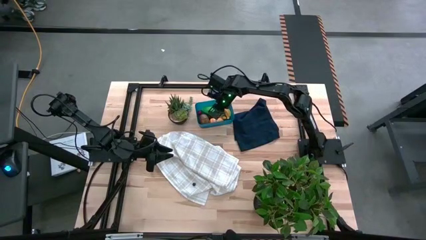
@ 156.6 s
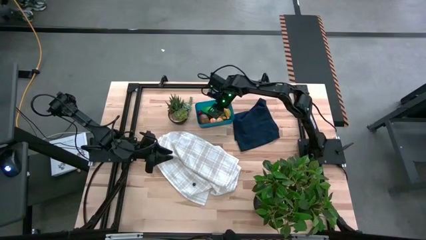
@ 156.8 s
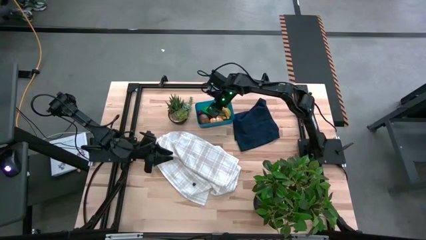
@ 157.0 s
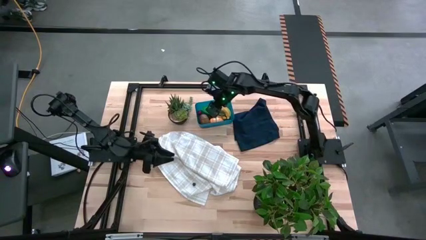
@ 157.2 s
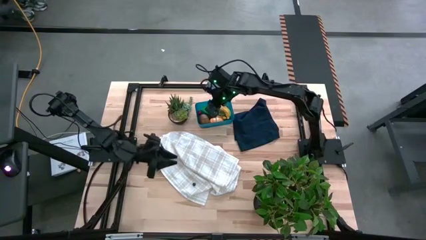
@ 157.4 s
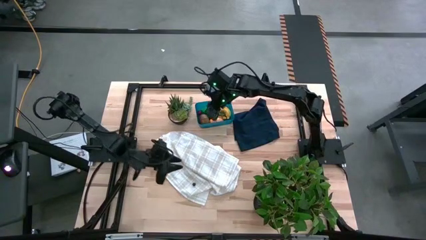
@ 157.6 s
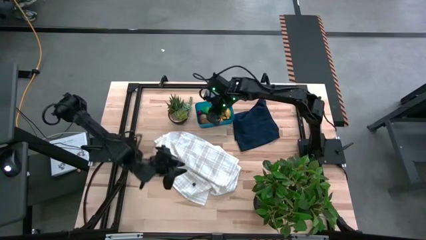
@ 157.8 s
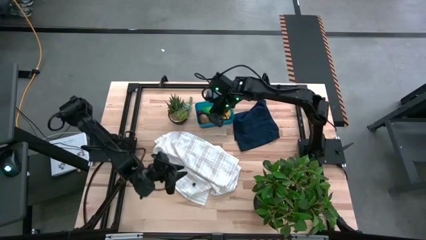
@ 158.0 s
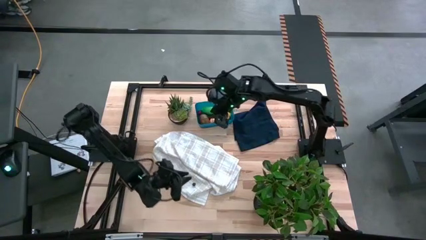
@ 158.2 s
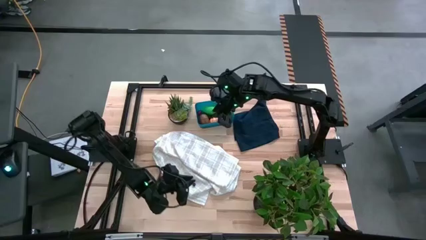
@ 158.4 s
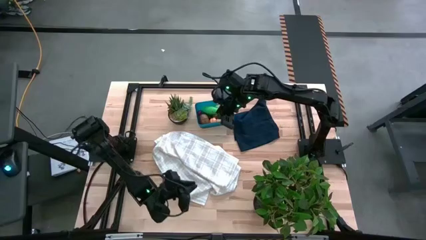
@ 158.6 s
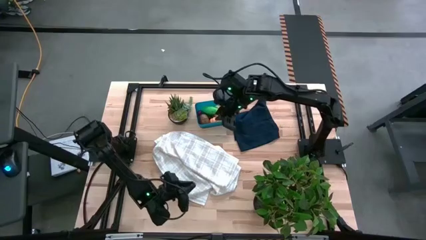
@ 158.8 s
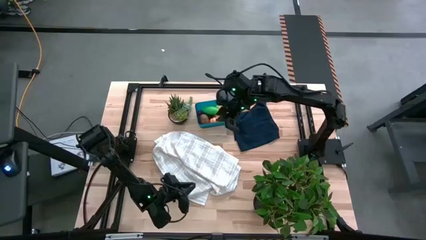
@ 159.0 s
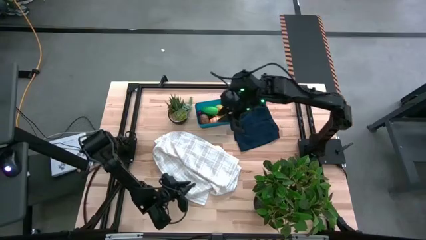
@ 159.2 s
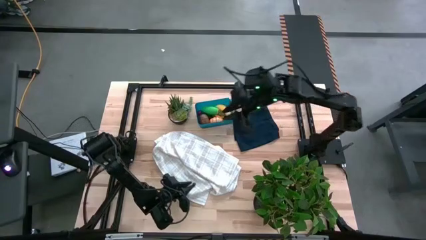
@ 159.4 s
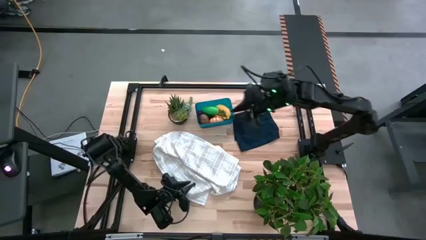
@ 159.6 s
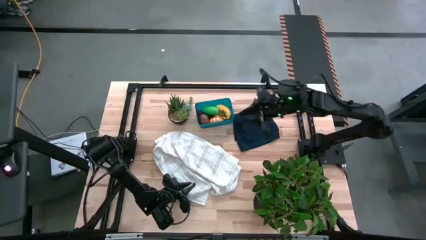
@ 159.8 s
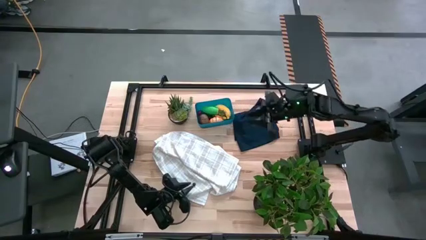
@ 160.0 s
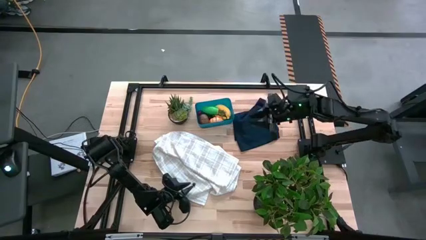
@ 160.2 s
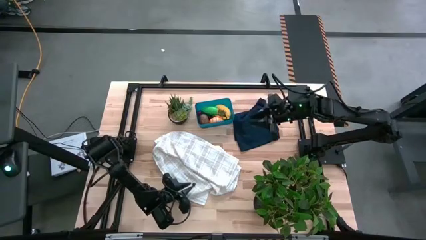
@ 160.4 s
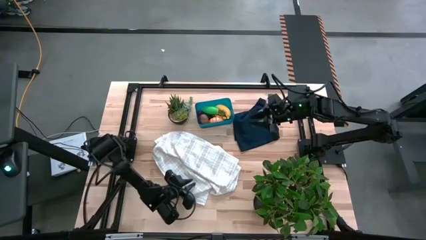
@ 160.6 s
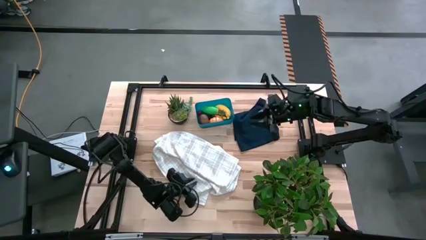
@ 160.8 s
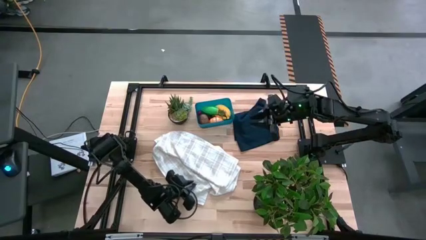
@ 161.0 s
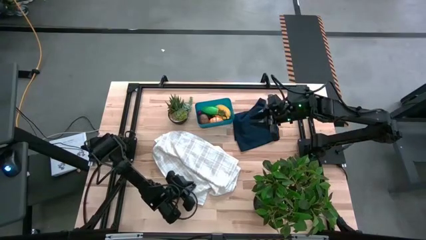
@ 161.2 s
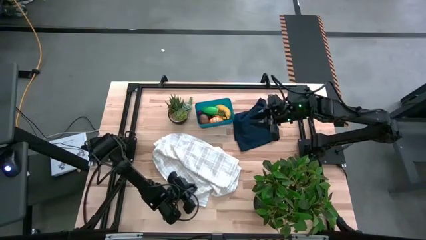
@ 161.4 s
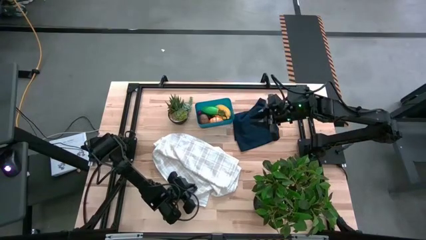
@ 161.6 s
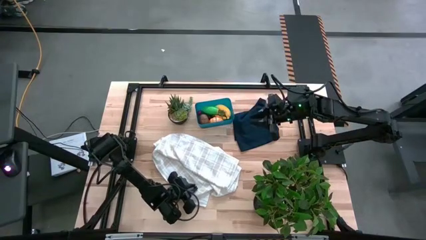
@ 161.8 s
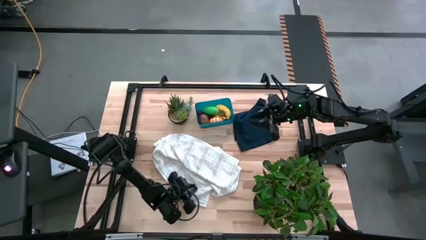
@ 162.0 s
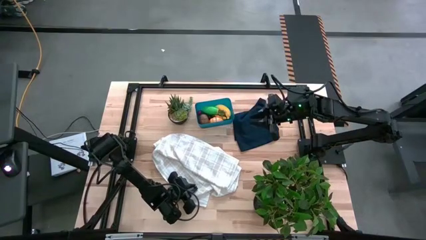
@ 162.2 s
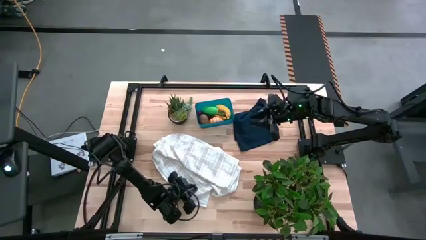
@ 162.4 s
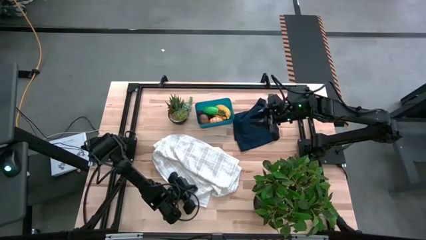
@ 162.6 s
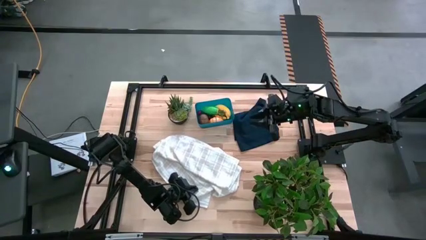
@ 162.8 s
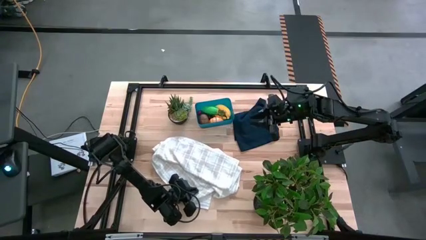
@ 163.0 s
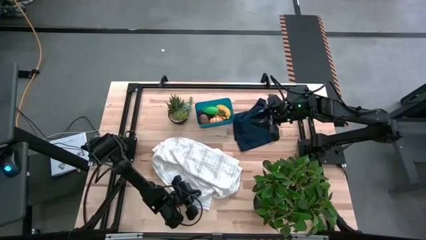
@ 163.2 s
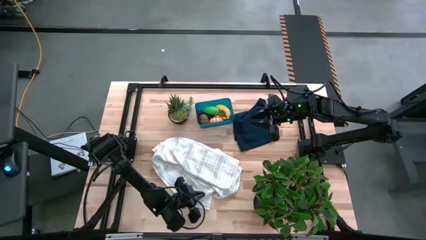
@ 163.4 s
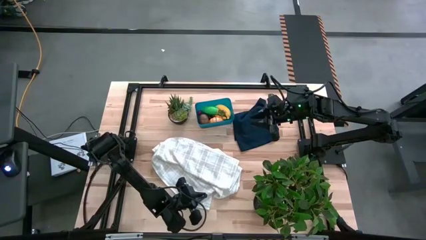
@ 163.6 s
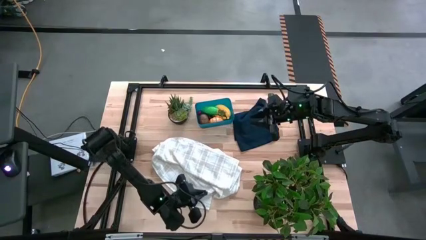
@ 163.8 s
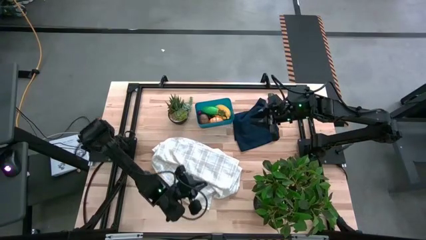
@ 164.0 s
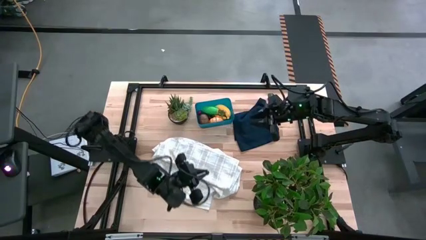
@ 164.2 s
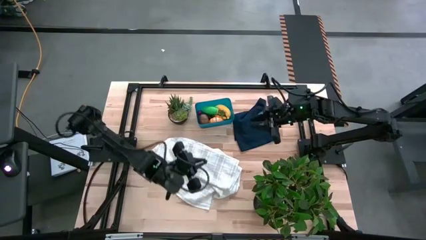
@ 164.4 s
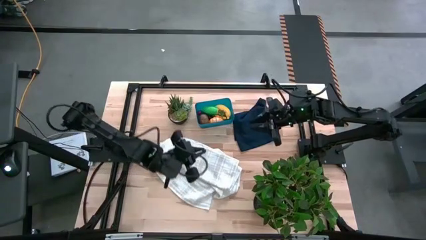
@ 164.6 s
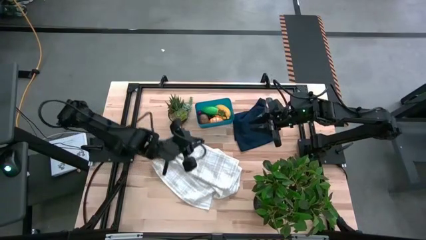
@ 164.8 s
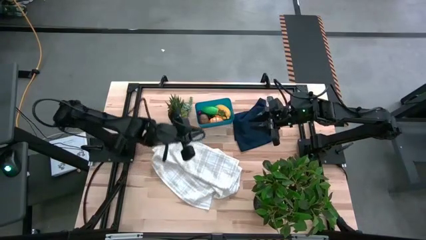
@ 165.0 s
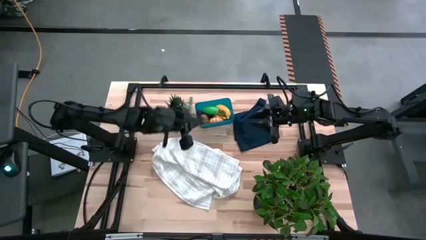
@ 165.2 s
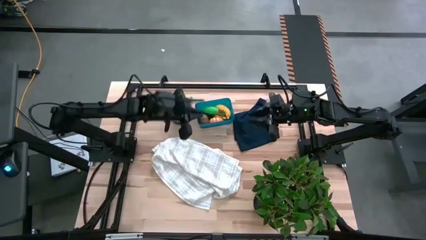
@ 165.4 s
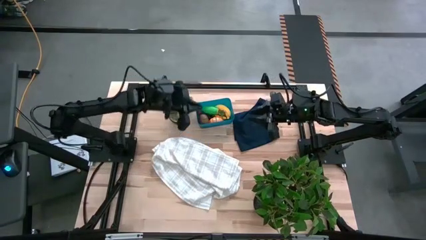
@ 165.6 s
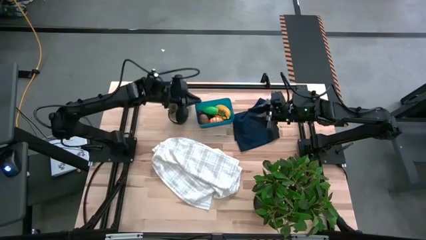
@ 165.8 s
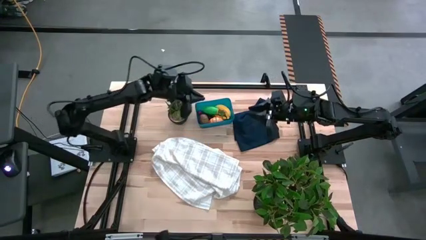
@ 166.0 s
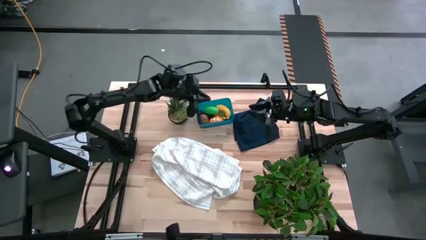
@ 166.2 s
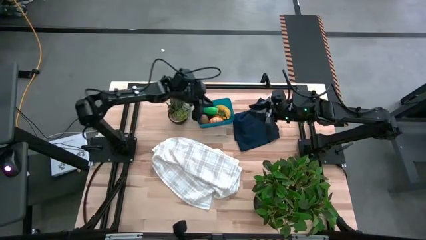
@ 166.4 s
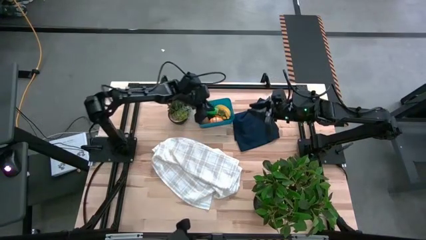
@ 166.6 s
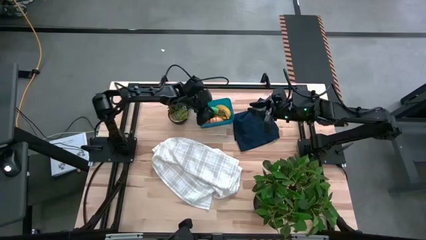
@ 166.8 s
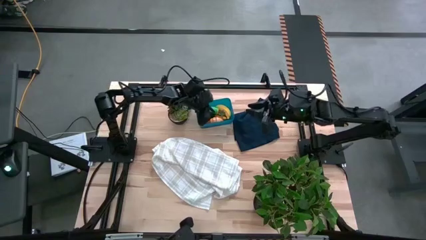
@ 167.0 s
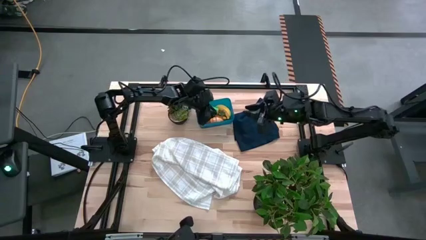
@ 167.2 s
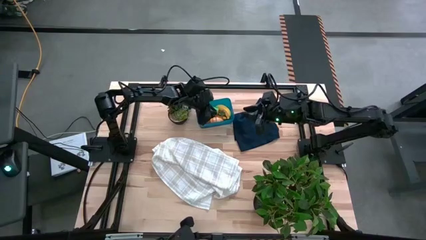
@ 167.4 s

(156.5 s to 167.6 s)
Task: Pick and placing Produce into tupperware
Put the blueberry into the blue bin

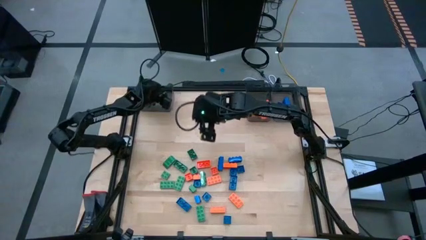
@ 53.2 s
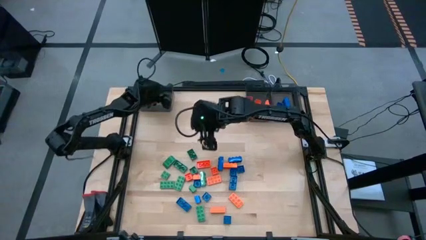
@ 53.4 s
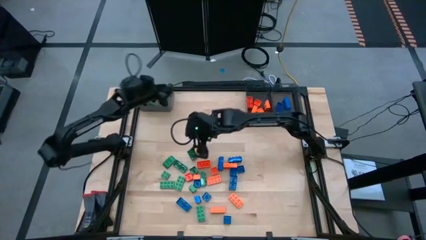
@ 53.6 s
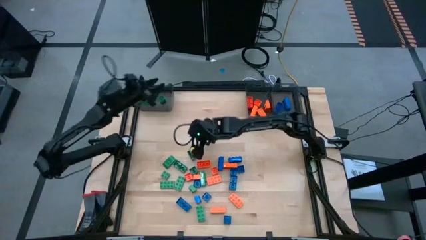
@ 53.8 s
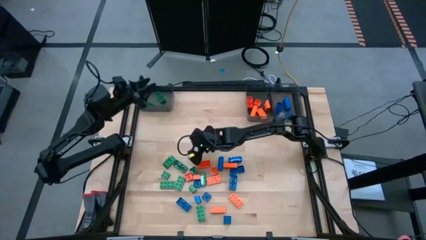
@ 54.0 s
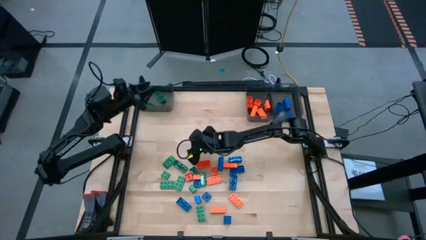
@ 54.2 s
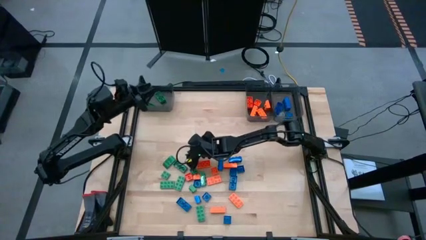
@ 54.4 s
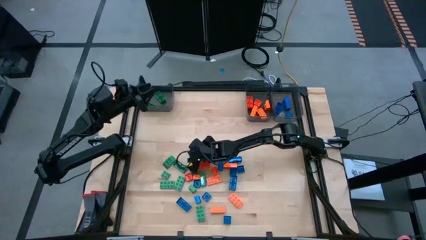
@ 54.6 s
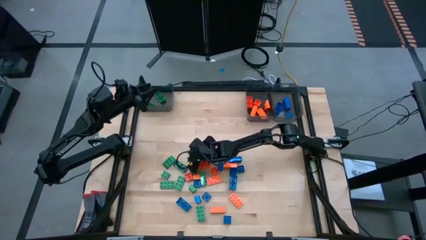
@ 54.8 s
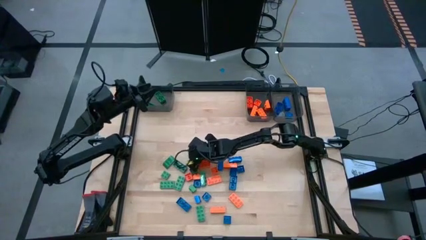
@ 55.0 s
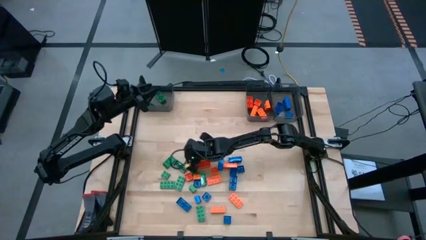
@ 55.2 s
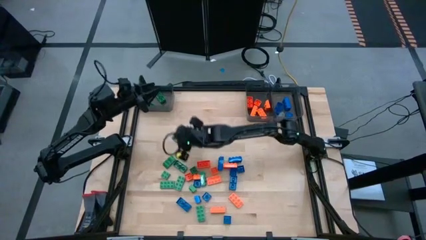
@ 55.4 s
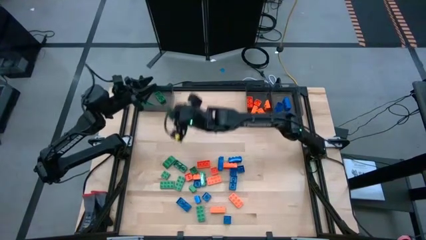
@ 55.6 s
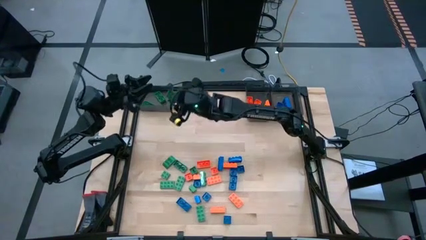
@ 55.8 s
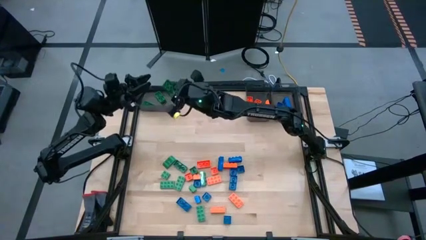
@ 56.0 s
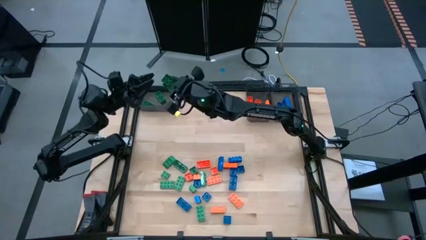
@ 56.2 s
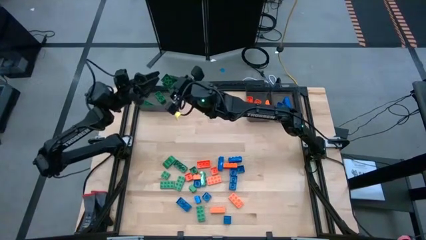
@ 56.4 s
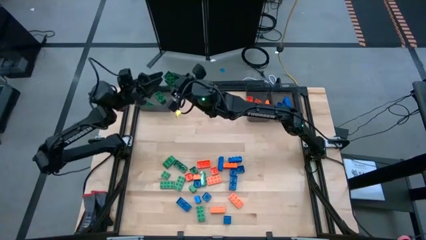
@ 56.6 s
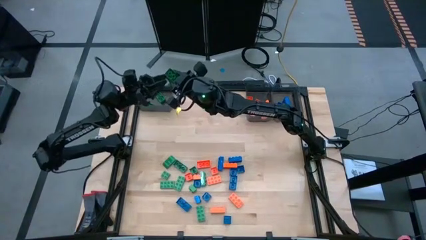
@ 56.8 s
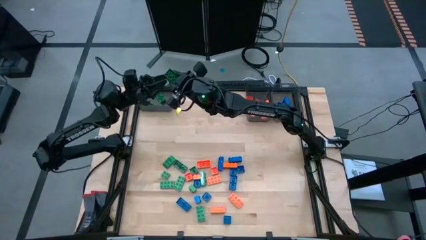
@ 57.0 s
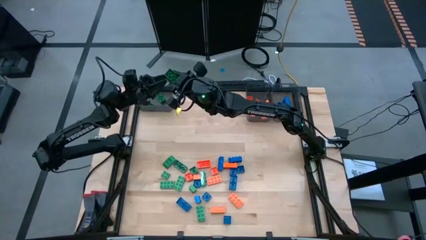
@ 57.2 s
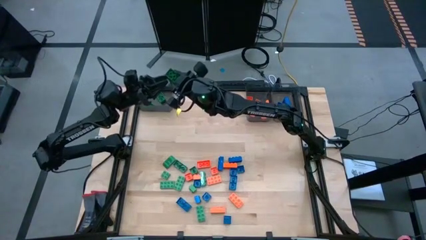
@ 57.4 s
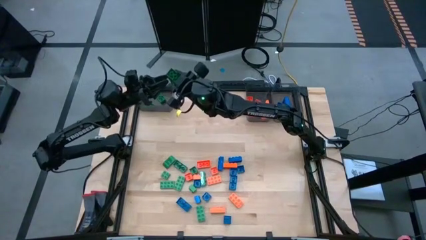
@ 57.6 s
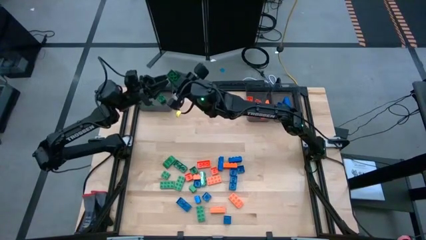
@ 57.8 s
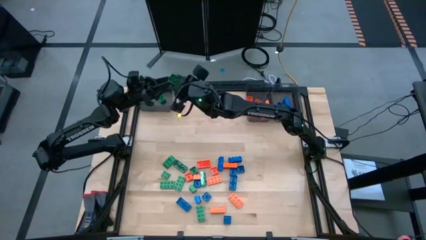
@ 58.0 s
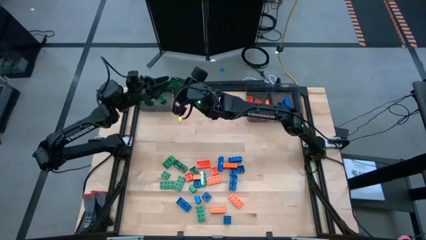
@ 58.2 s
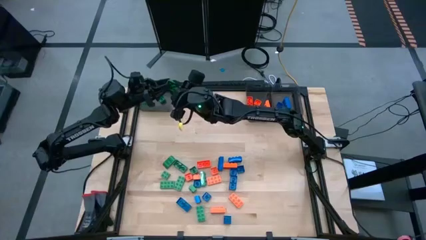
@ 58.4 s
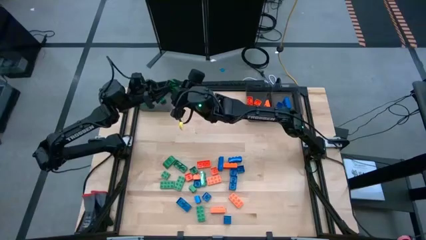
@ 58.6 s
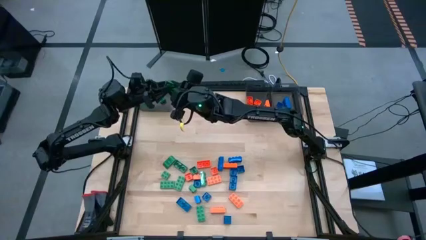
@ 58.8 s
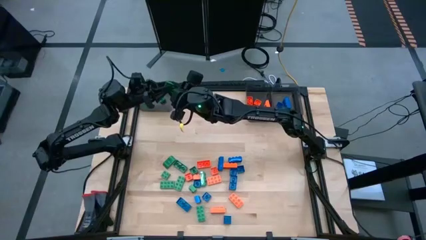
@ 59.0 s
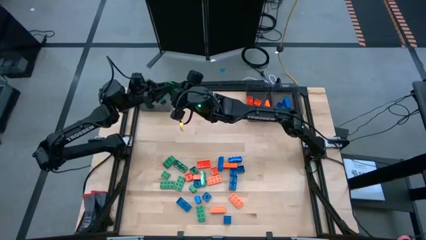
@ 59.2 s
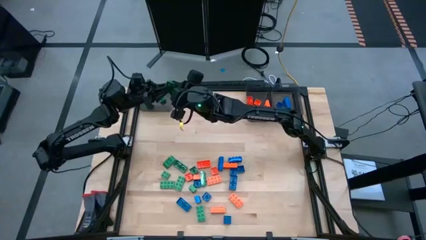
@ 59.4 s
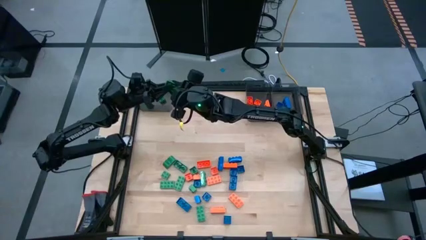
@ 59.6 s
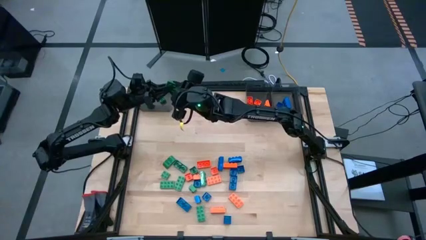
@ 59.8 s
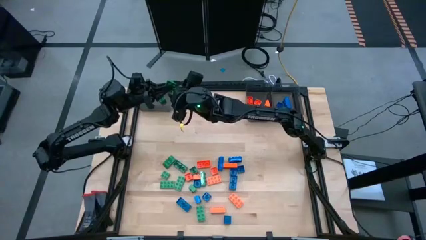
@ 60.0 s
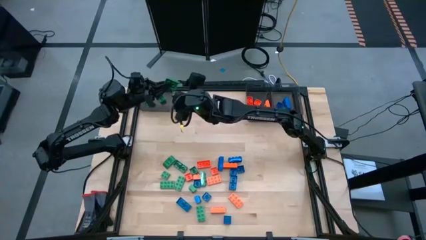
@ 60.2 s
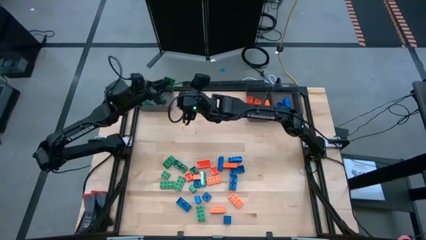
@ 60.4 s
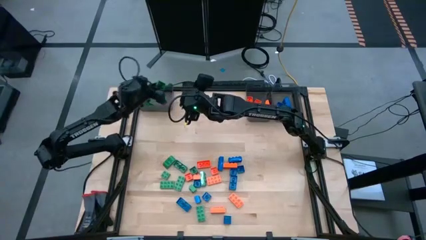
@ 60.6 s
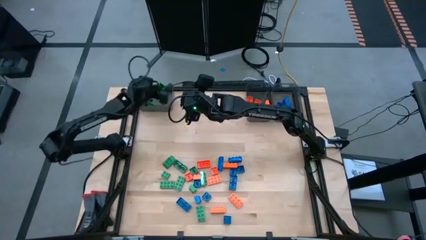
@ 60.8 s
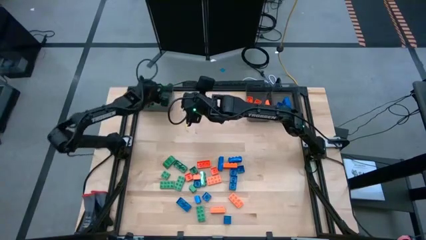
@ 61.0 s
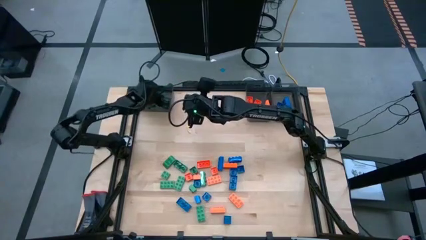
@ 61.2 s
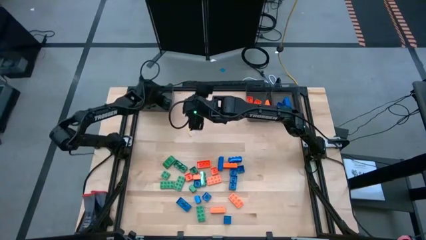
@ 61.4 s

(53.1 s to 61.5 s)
Task: Sort blocks
Put the green game piece into the left black bin
